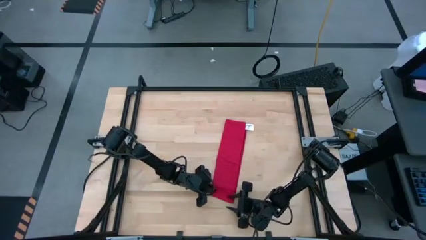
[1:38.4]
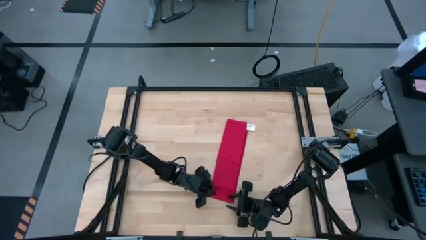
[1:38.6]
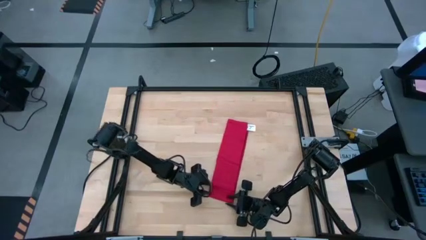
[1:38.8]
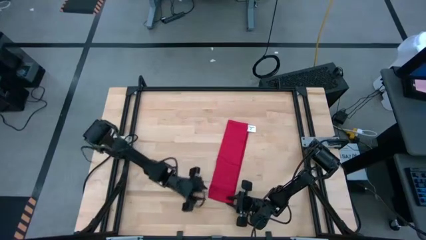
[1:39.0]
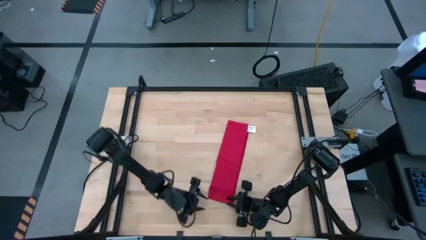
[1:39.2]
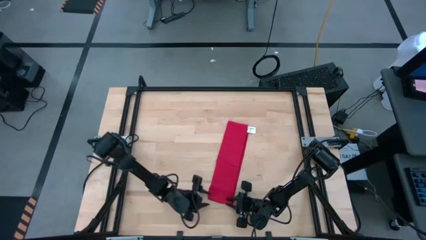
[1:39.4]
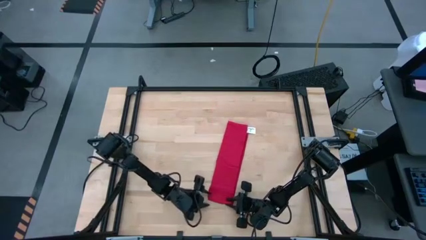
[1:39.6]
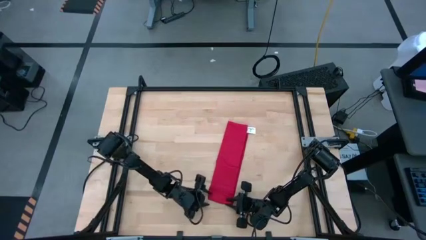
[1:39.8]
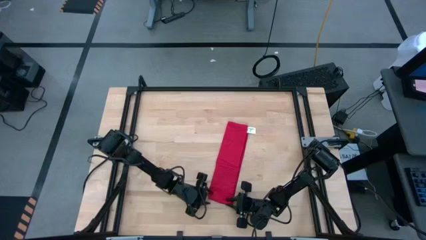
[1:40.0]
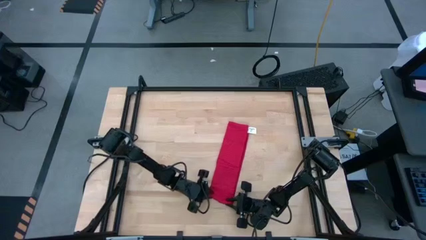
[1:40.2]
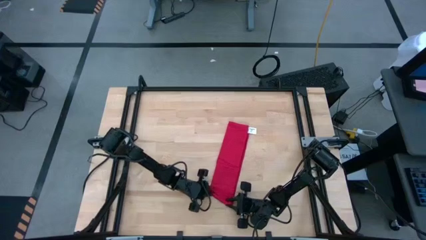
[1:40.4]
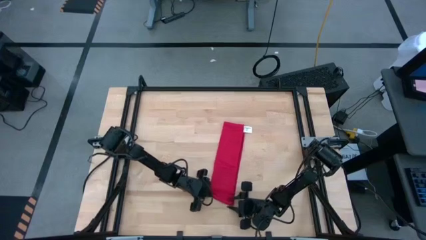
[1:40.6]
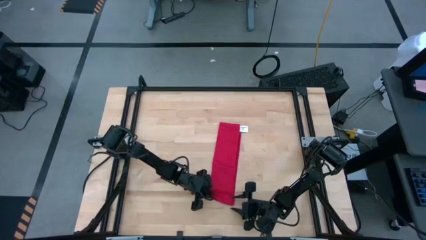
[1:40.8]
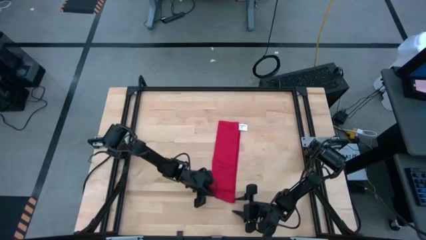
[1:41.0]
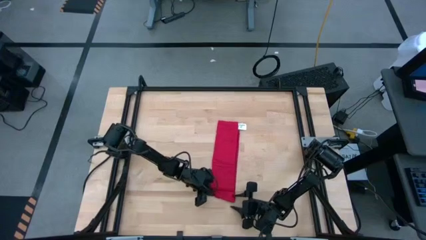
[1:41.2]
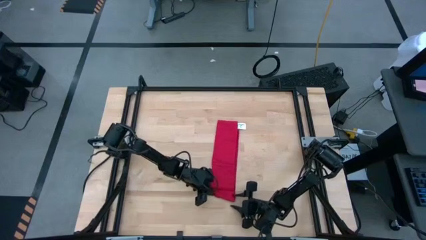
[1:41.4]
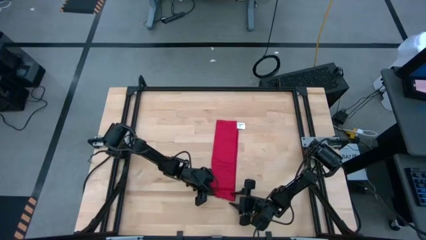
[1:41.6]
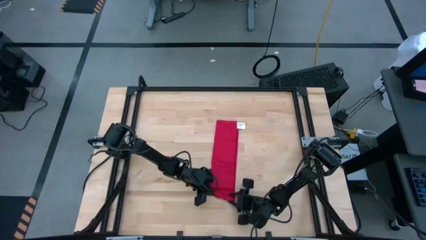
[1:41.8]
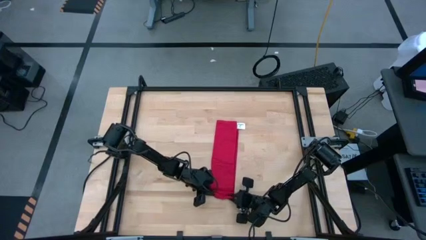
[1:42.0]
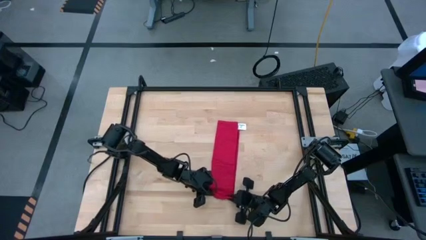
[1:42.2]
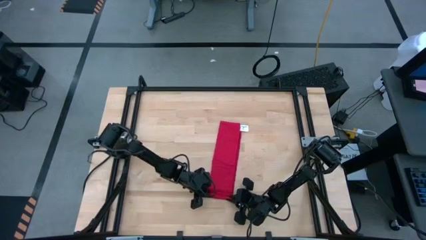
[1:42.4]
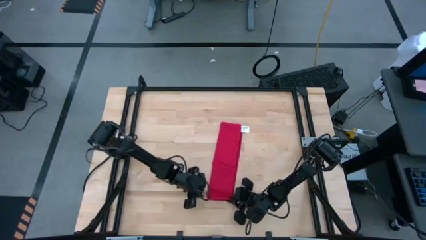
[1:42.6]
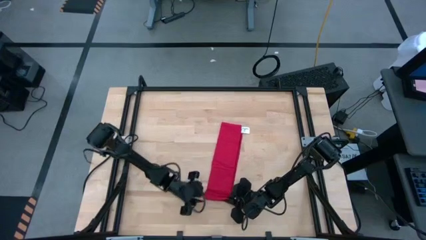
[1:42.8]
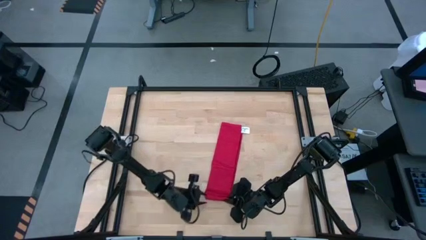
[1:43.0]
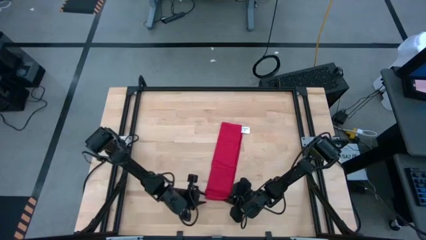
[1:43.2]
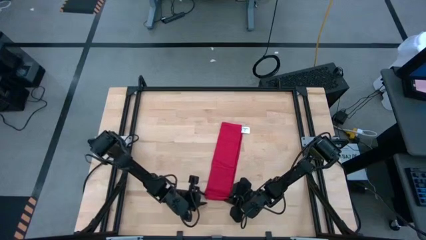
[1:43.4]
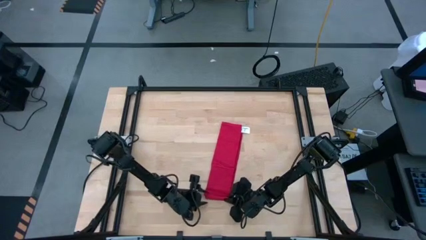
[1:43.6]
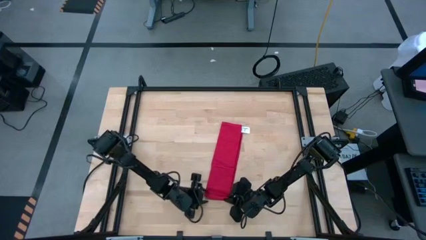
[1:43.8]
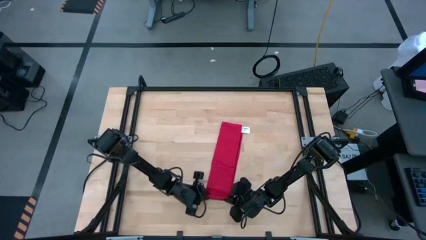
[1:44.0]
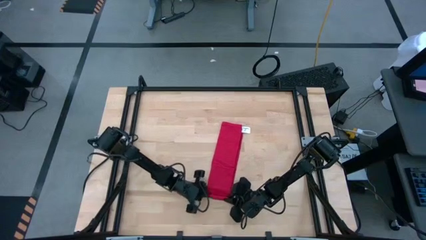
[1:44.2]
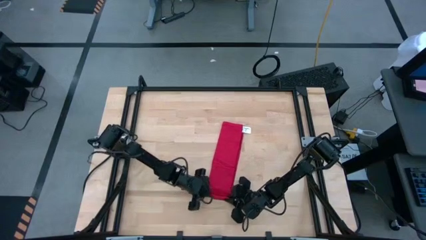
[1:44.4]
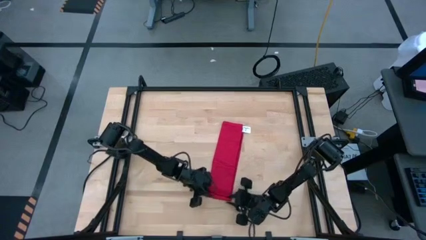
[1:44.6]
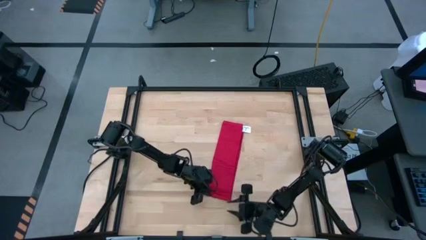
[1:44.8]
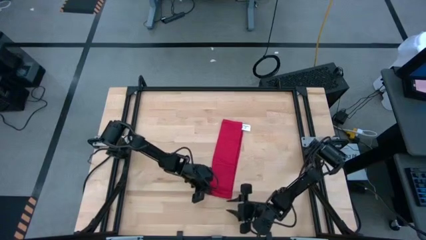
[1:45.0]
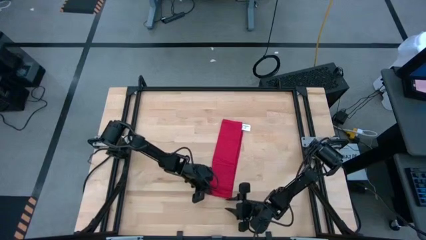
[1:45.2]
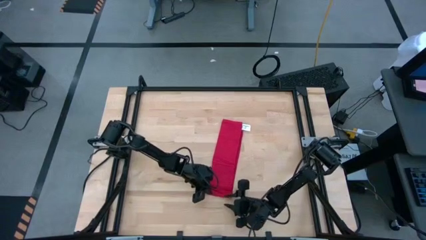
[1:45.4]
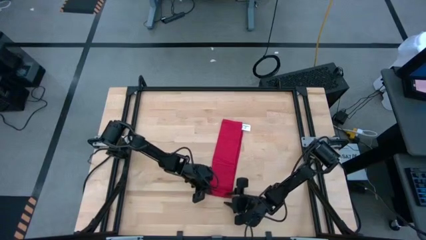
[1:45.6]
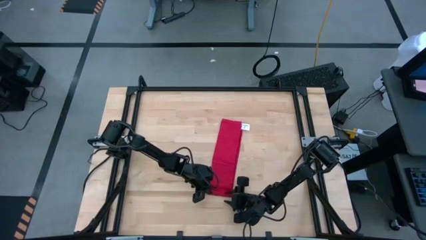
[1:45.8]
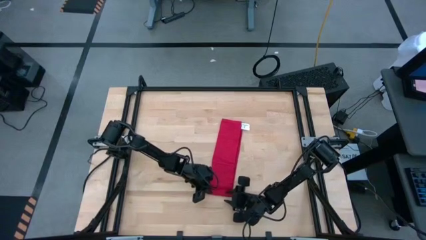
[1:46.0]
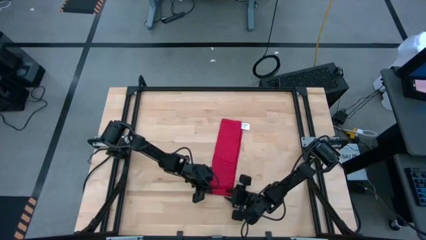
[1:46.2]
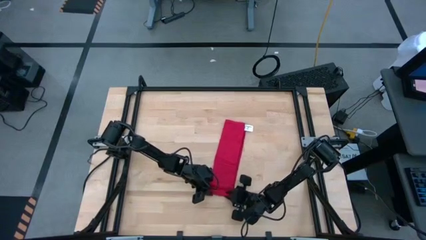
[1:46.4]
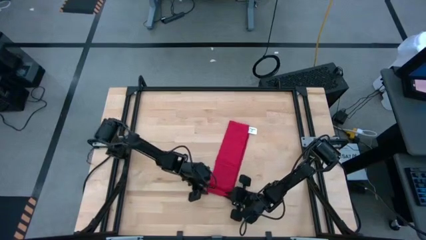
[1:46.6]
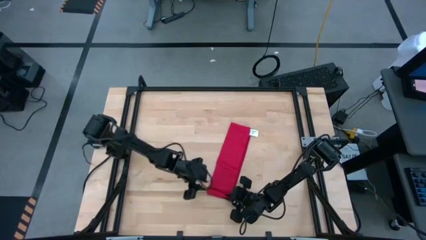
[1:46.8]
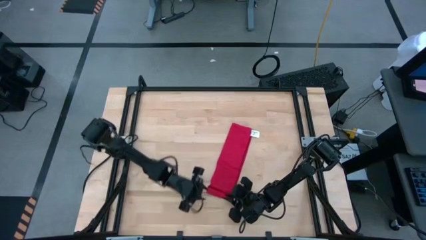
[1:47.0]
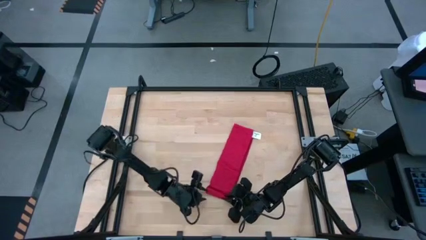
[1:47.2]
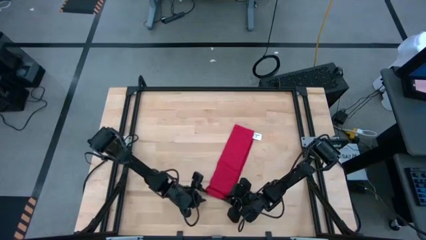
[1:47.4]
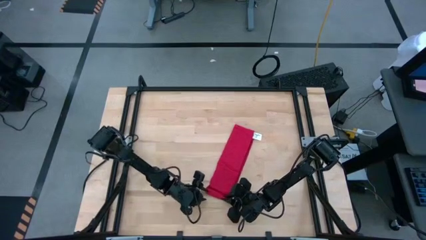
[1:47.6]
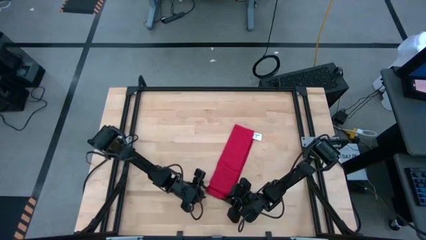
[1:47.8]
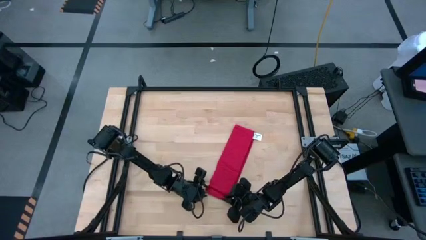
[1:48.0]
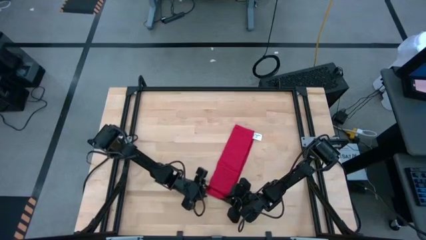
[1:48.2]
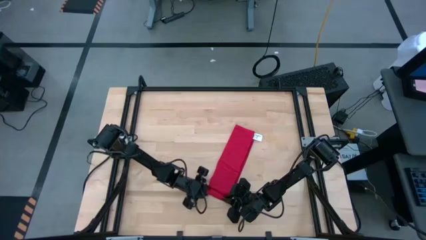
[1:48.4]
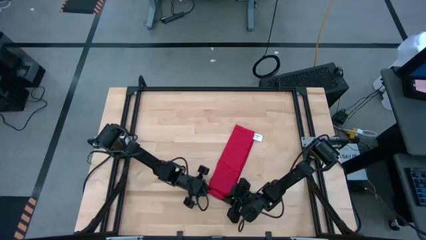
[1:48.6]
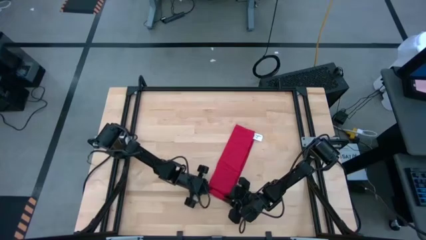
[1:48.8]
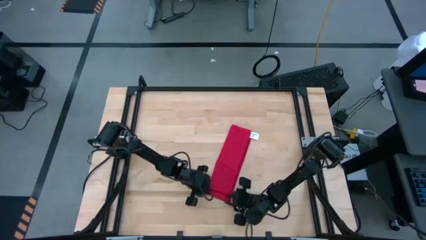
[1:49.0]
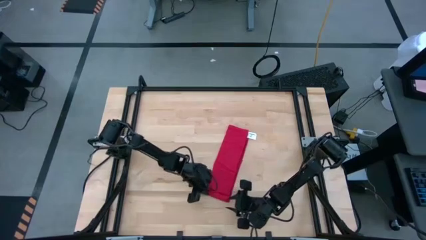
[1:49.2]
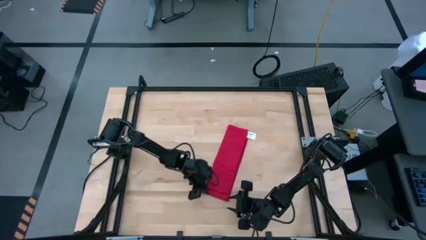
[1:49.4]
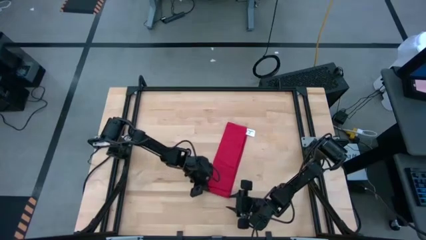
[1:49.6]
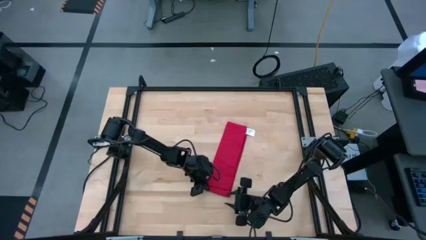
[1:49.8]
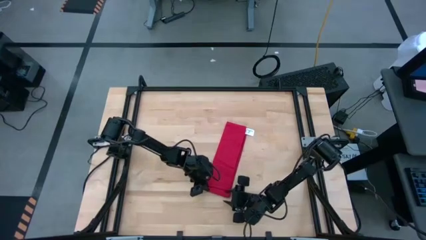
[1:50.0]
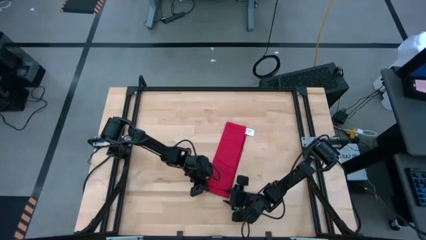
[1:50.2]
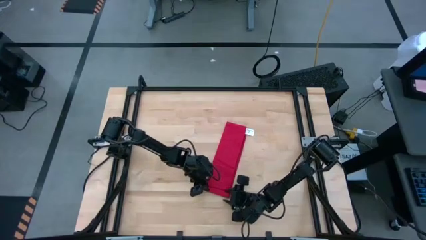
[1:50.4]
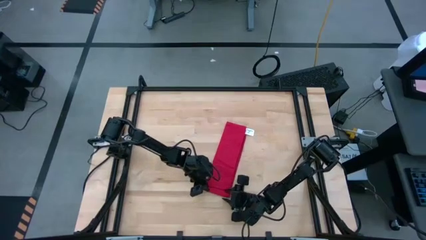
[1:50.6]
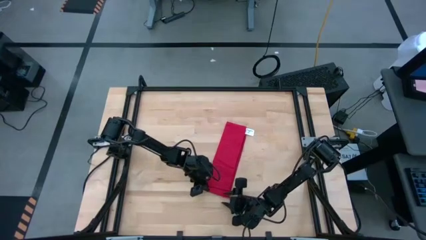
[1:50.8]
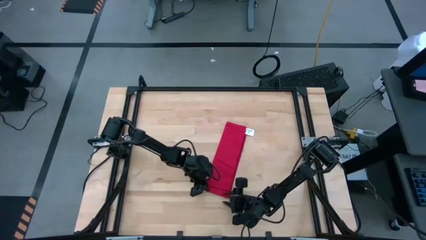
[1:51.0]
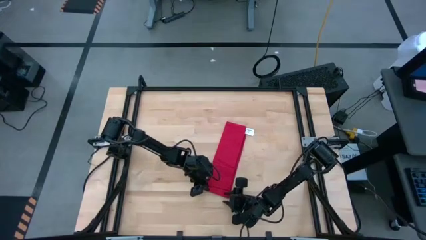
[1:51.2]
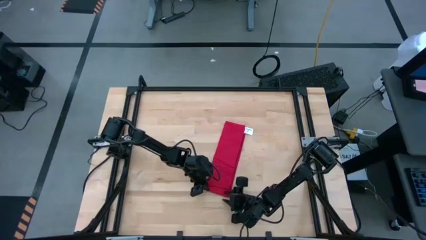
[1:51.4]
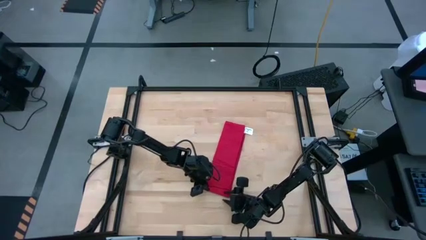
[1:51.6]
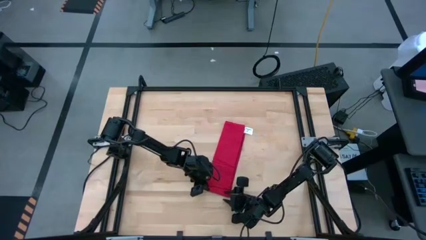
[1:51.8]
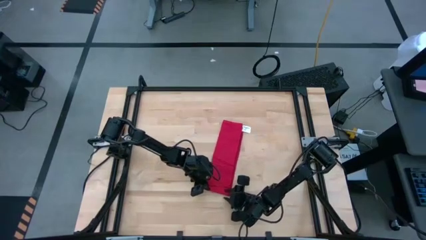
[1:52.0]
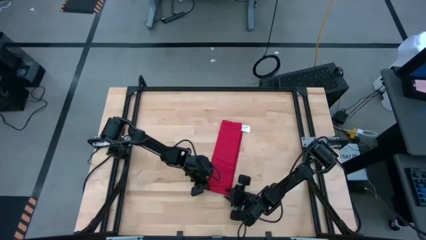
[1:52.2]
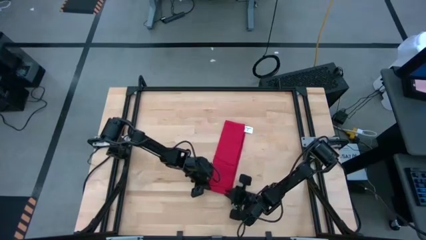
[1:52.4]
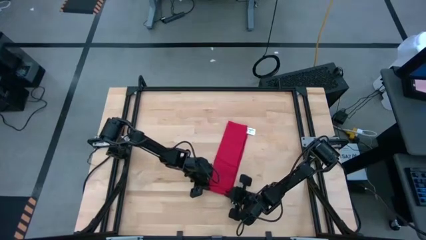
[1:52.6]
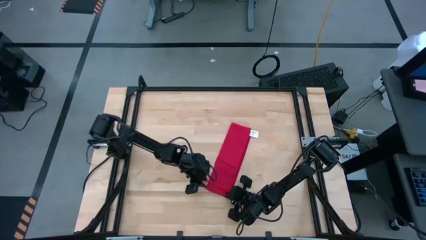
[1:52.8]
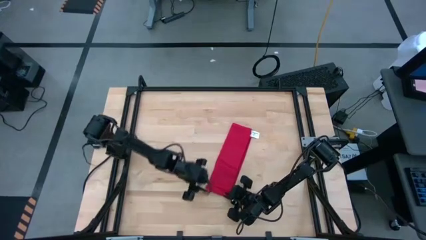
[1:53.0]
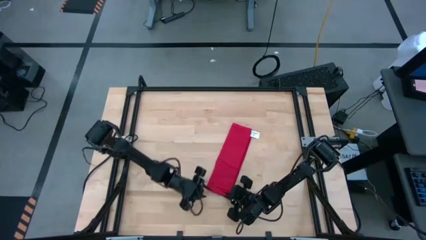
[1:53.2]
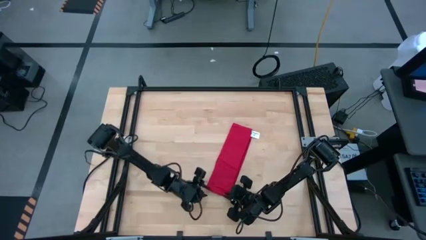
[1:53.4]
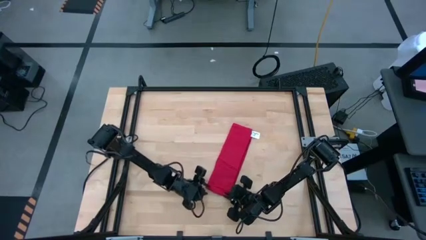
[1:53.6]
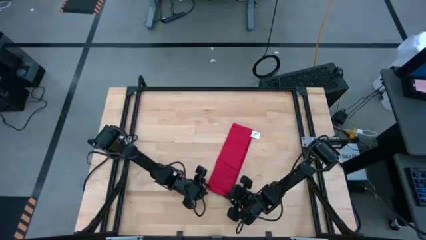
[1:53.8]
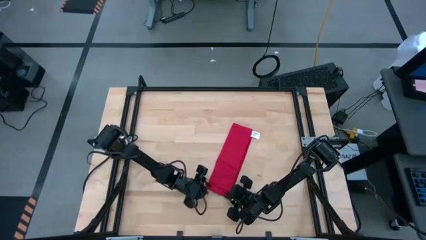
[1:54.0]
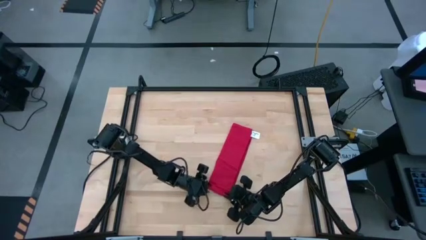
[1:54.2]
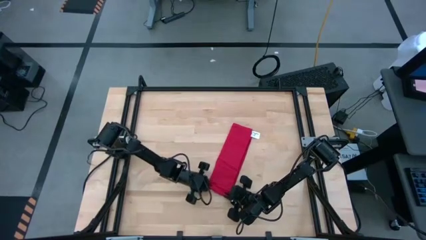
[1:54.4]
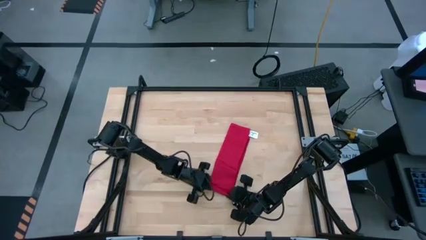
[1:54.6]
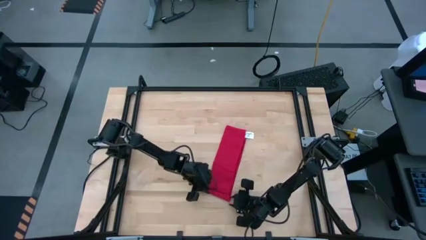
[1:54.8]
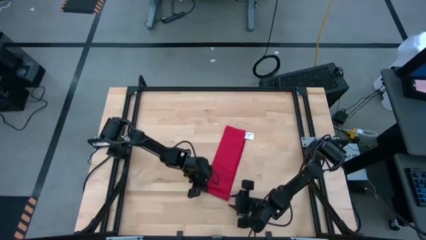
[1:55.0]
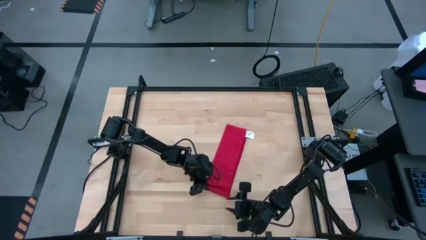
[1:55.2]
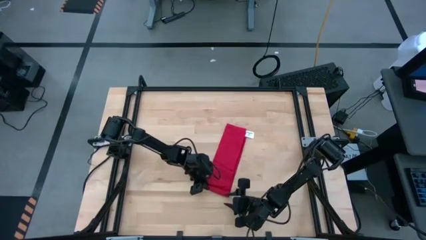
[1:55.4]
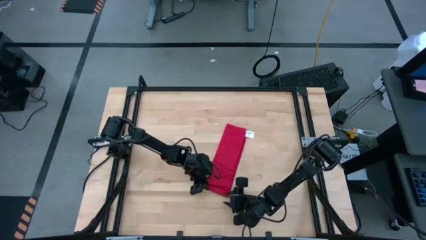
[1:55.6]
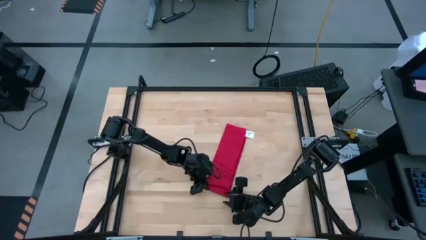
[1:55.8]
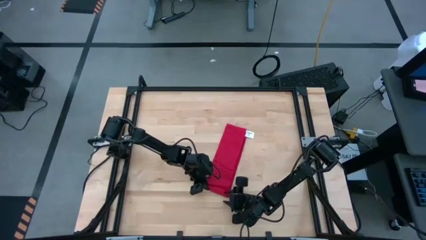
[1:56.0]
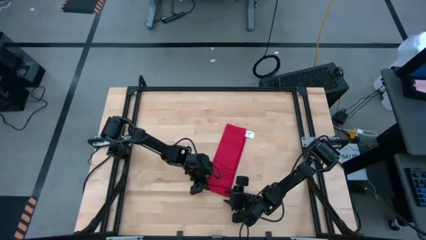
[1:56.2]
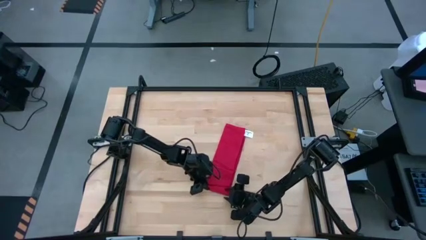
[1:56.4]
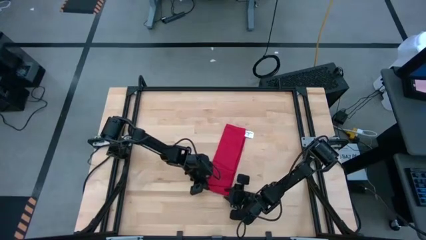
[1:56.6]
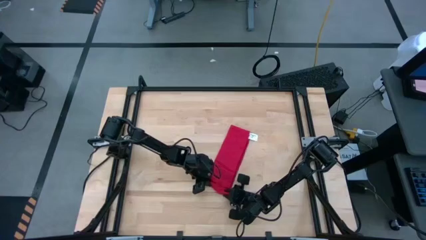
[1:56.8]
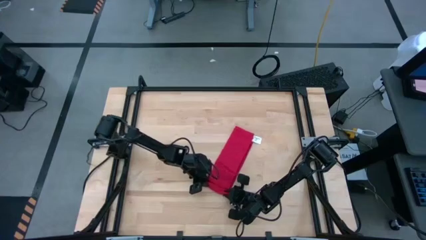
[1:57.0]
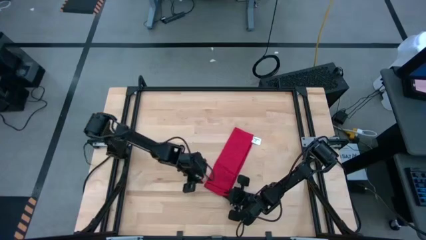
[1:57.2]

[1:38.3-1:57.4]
Task: Roll towel
Roll the red towel
